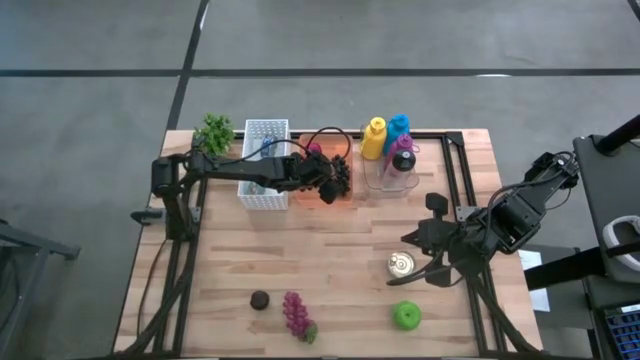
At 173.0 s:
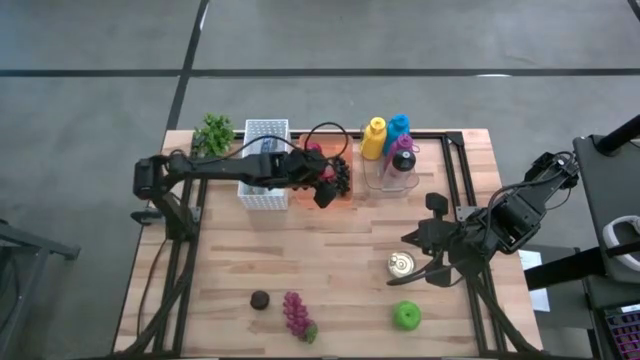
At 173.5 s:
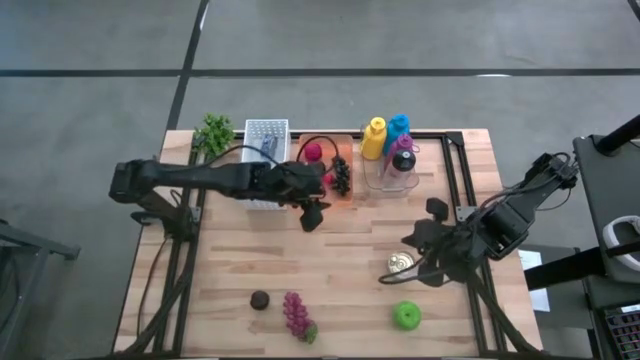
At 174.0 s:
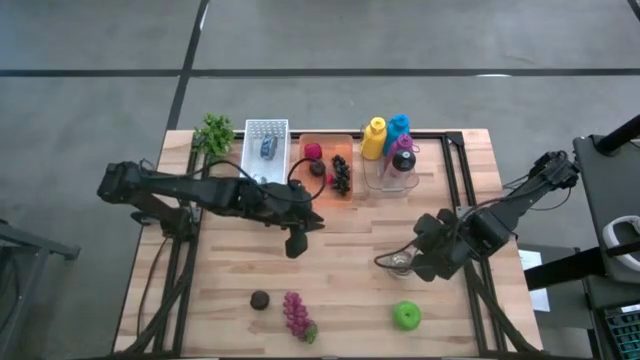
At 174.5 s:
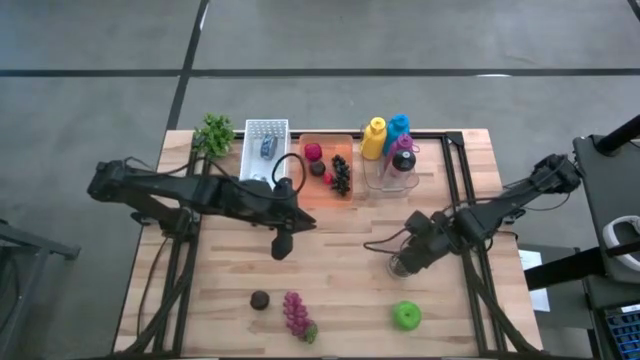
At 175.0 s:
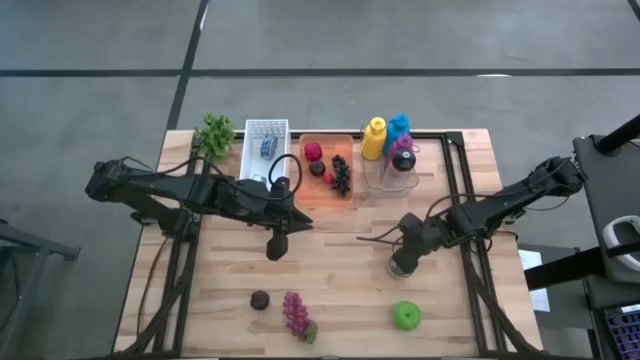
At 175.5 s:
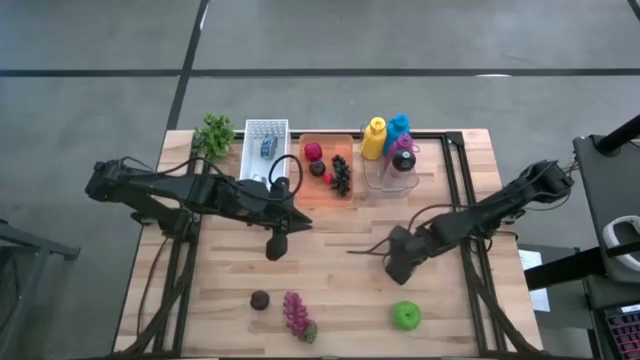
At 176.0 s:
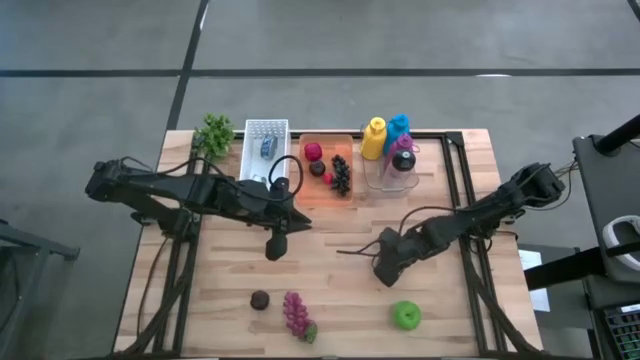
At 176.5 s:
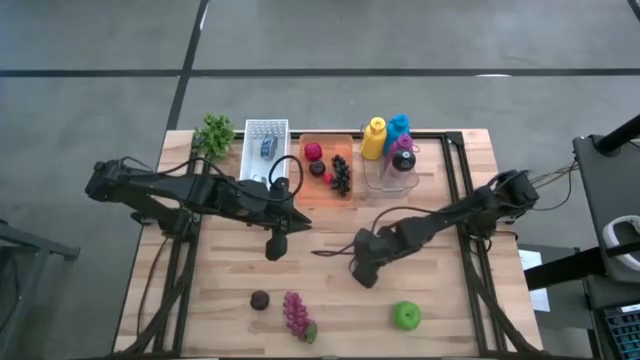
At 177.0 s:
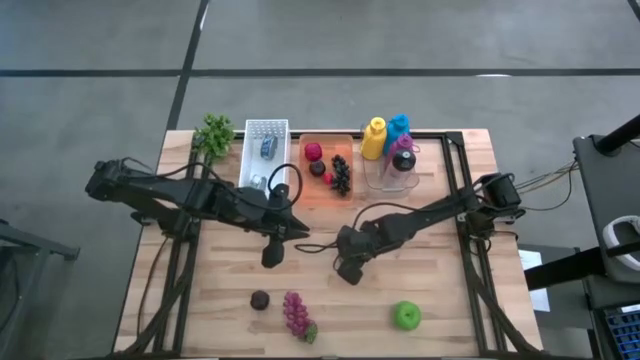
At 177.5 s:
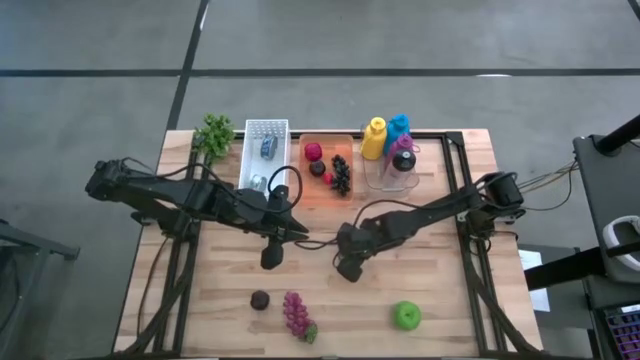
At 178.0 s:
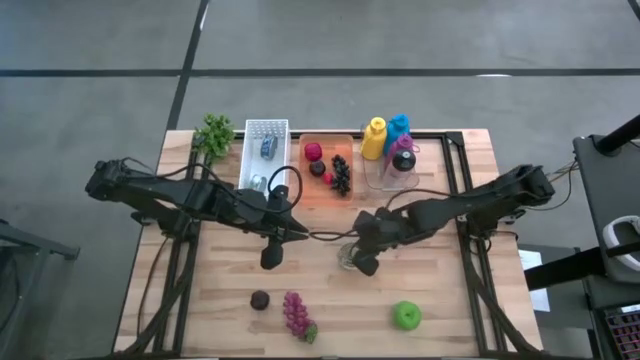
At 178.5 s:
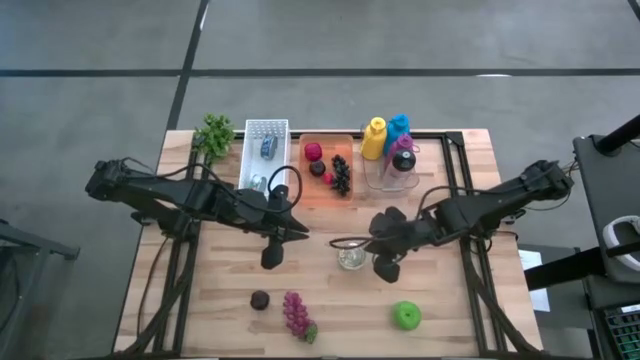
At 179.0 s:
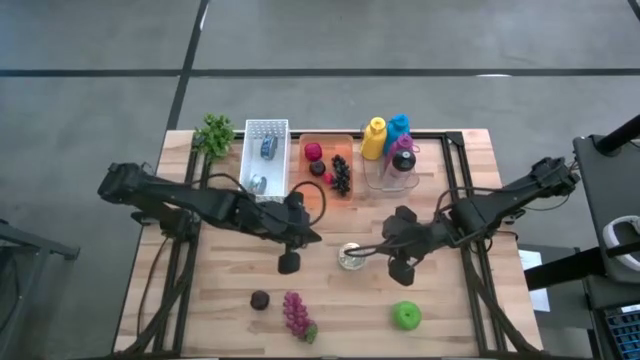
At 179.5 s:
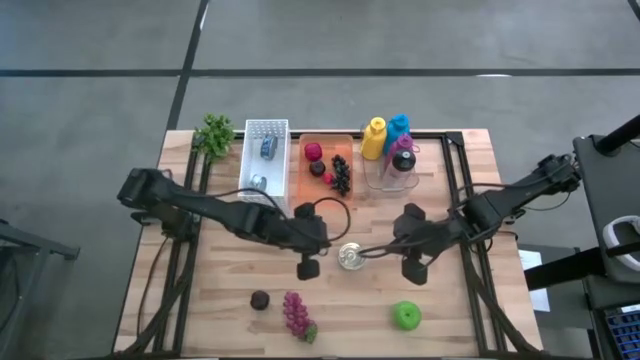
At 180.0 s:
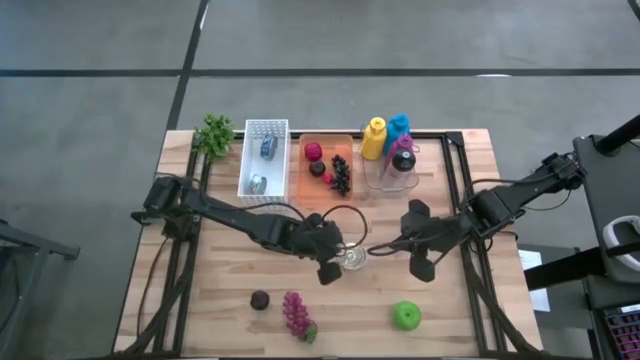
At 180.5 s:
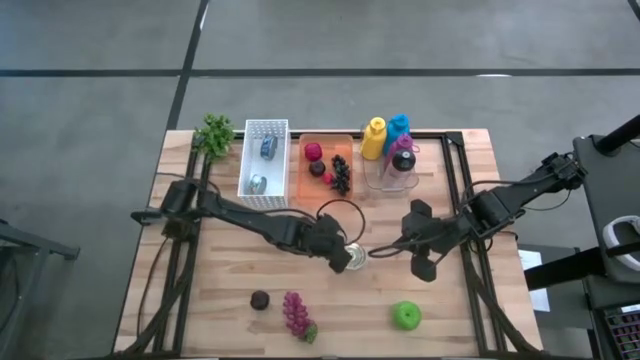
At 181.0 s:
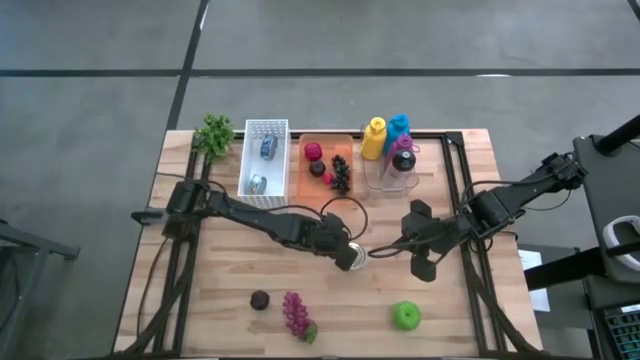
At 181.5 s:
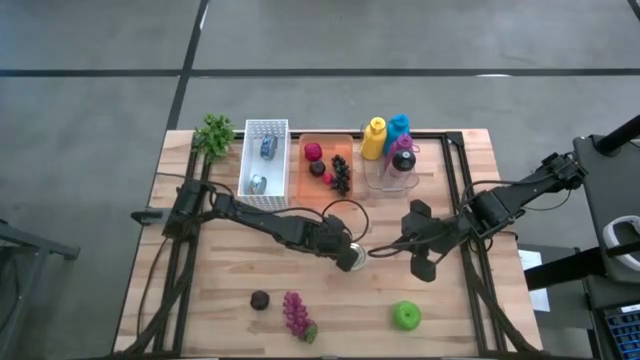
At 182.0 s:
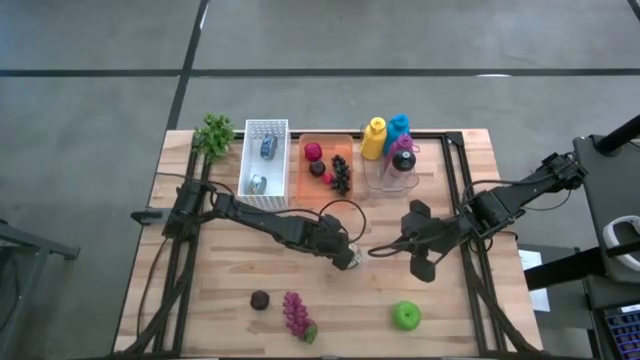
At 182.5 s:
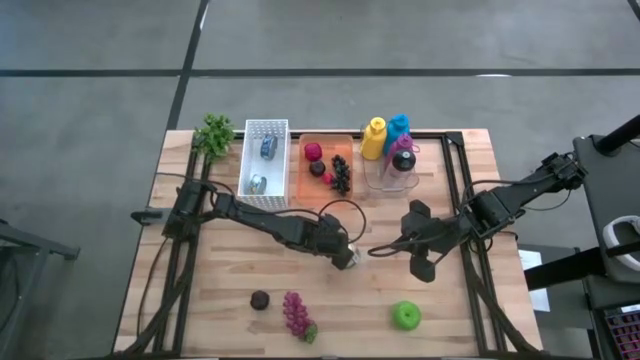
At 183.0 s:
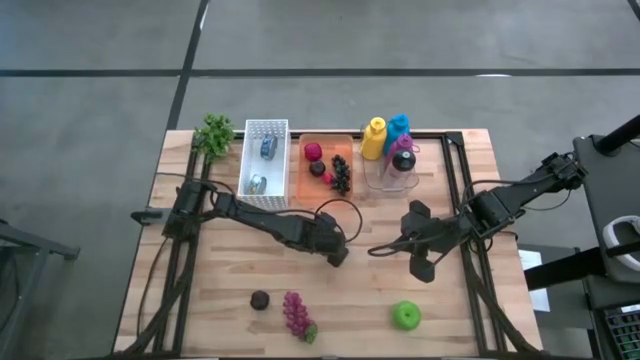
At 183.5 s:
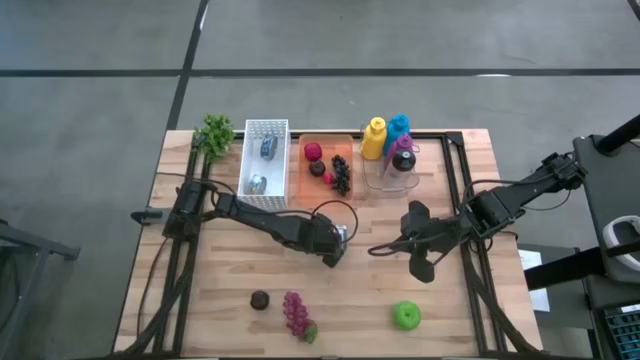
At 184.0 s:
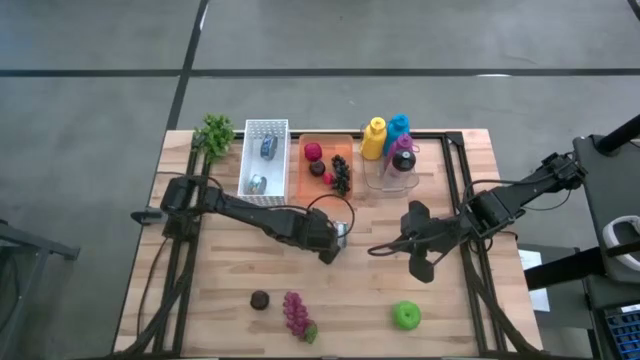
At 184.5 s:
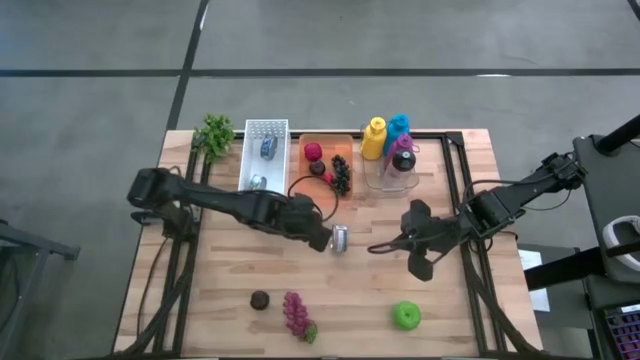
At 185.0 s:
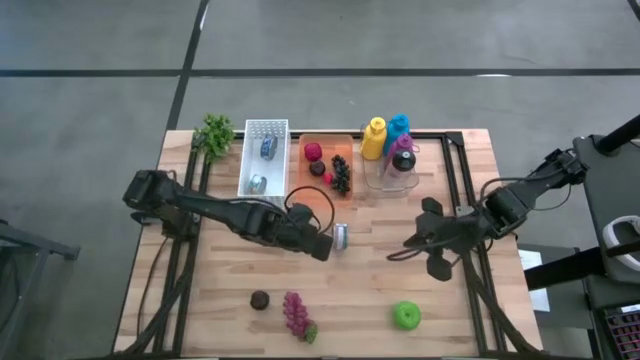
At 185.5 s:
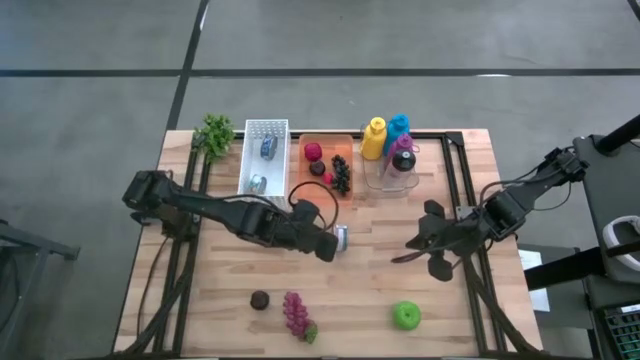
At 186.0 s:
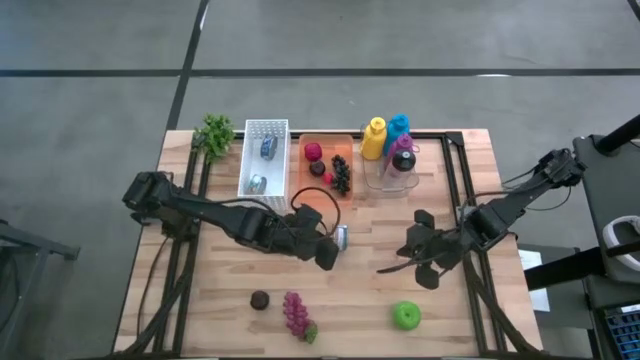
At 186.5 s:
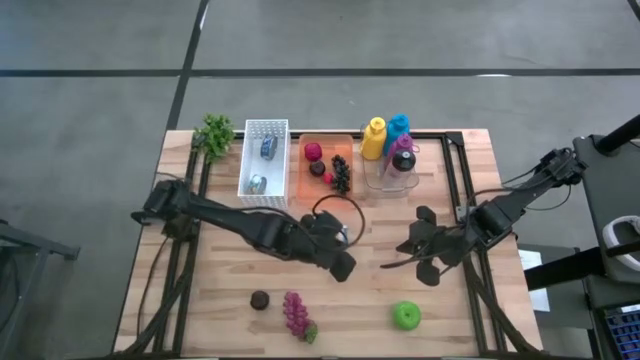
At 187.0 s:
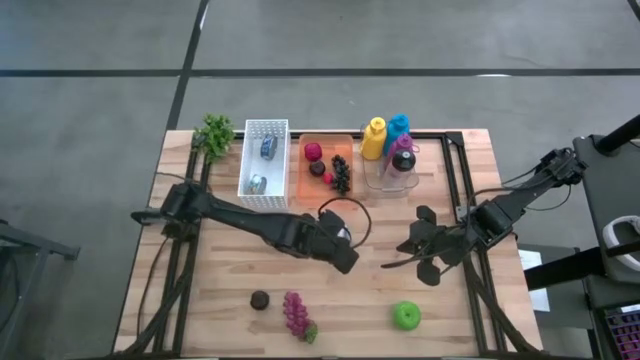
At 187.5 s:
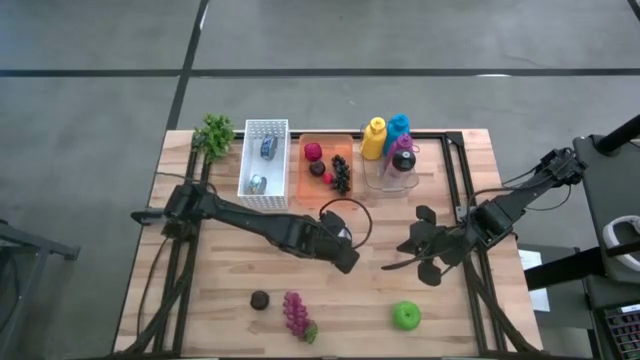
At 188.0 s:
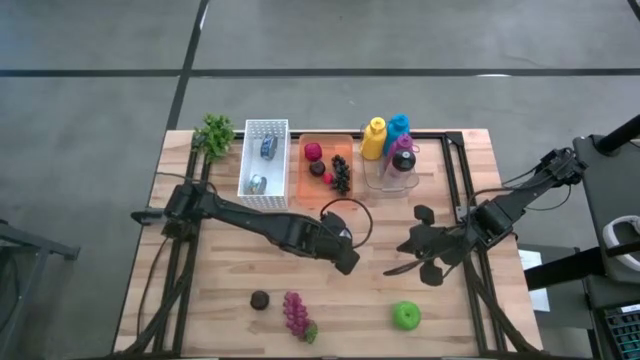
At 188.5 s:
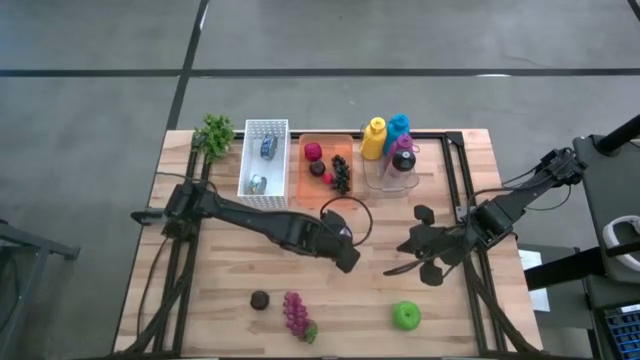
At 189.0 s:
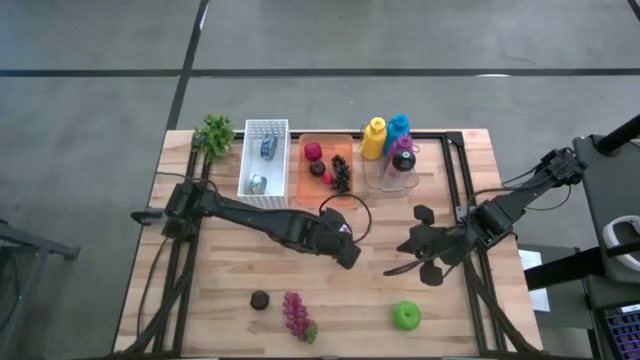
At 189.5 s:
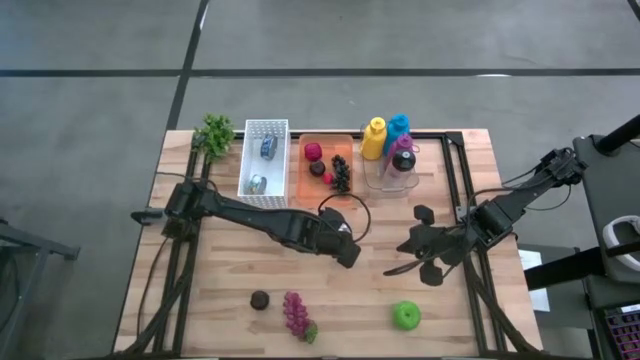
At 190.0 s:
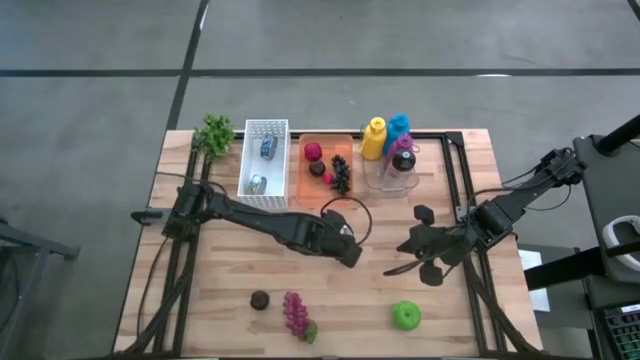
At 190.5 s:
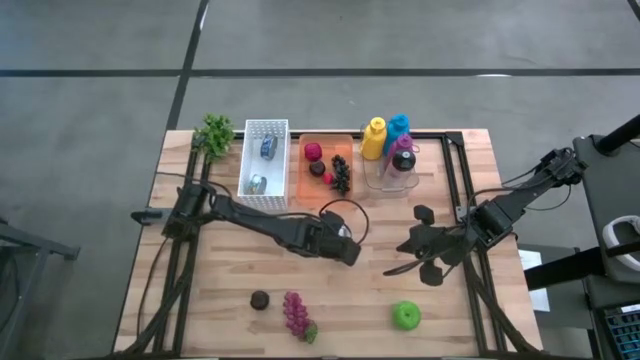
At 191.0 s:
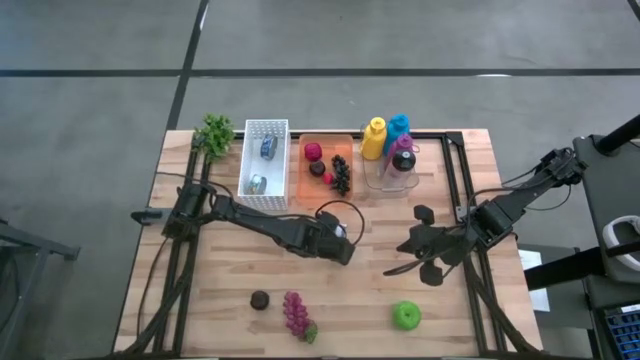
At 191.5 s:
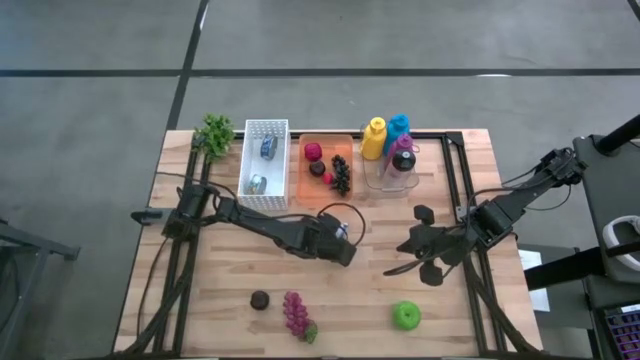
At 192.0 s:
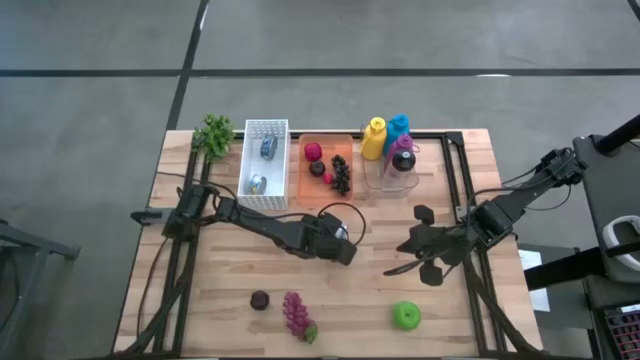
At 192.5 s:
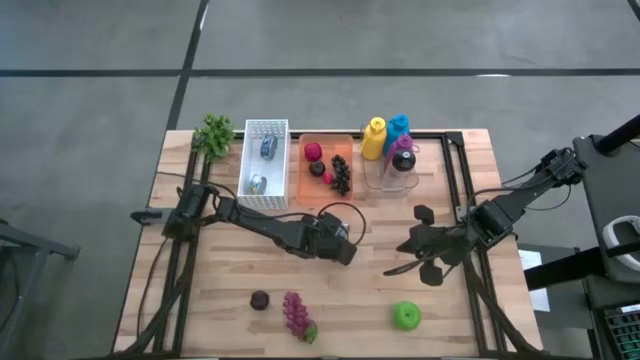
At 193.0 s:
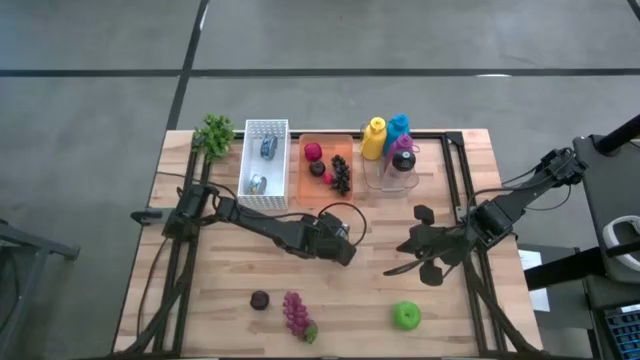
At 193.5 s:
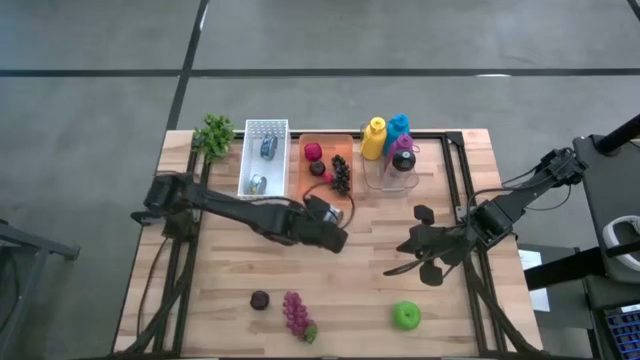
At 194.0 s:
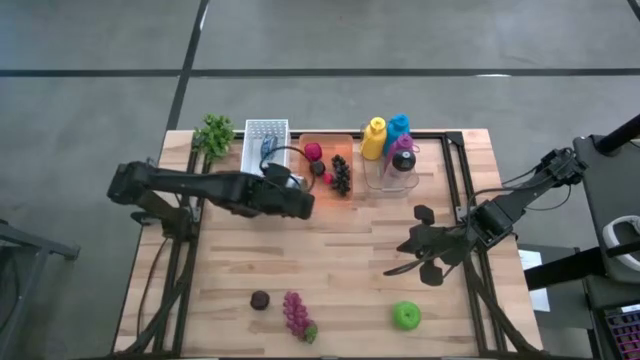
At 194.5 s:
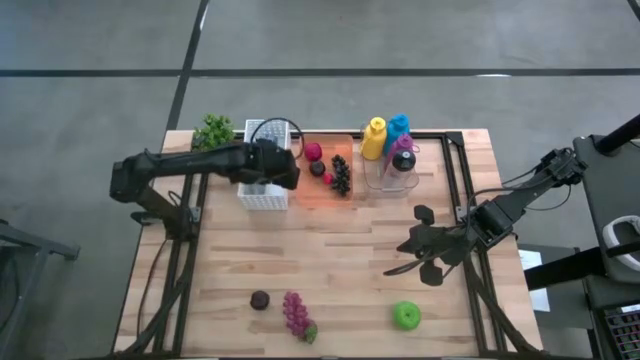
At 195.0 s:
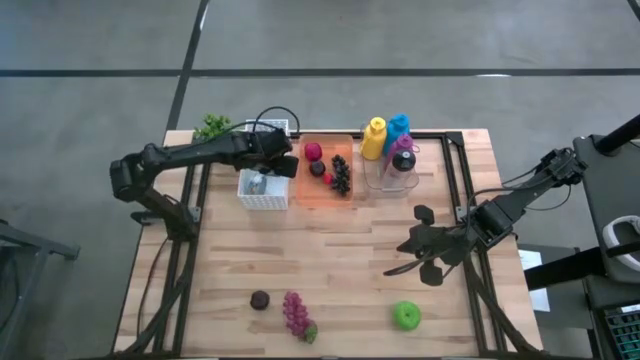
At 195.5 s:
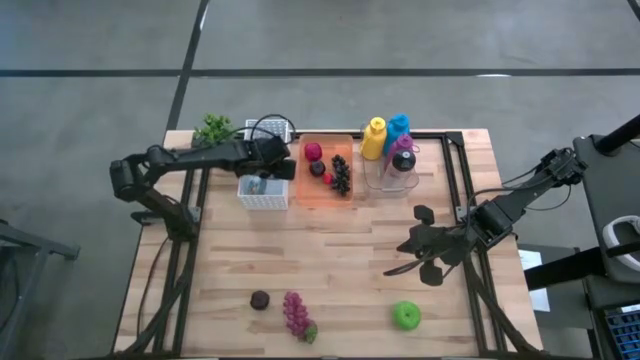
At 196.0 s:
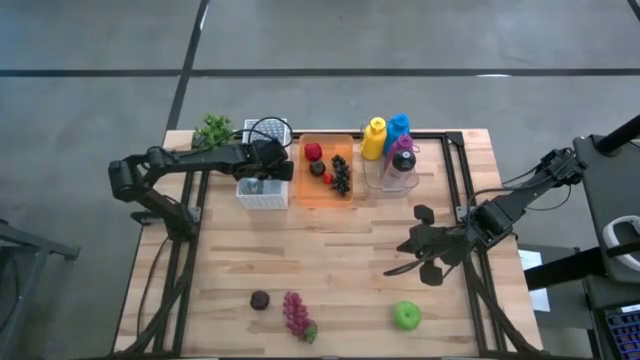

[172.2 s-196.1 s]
Task: Pick & Place Food Item
Put the blue tuna can into the white bin
